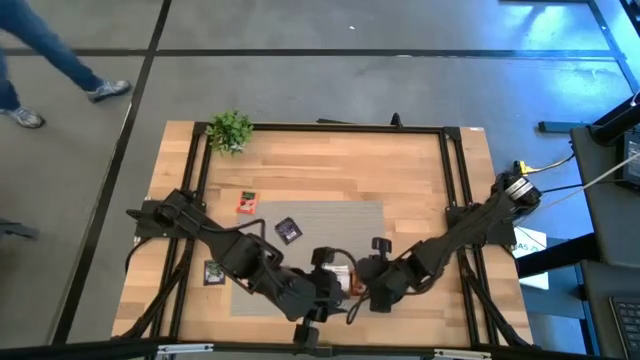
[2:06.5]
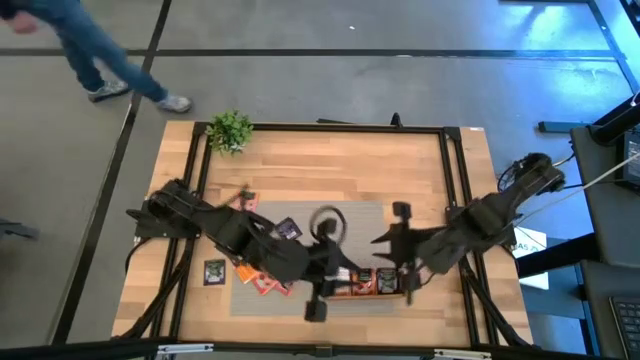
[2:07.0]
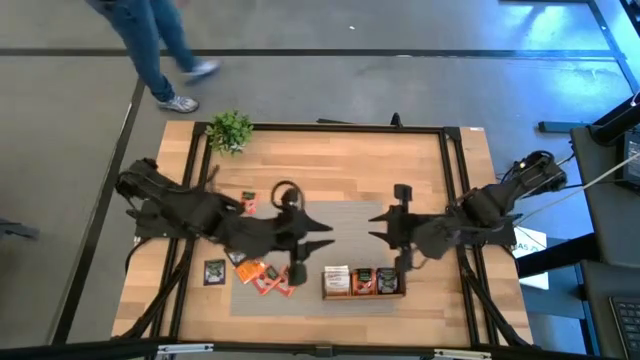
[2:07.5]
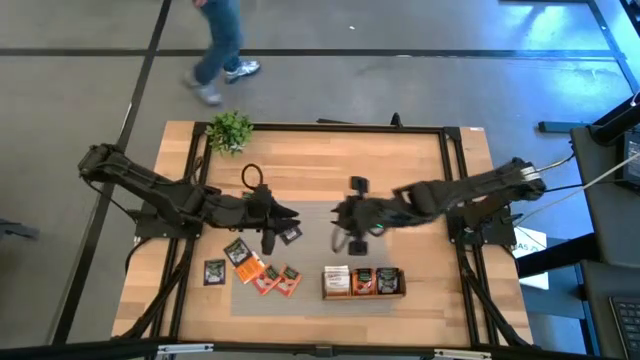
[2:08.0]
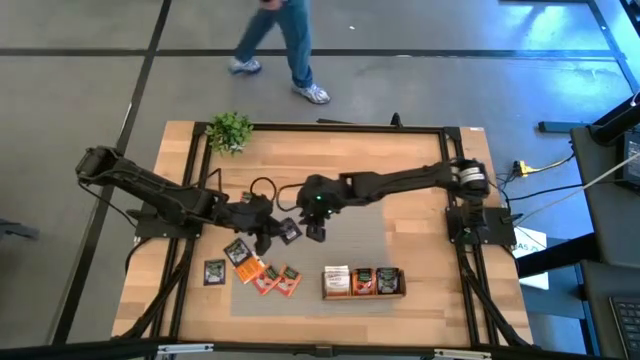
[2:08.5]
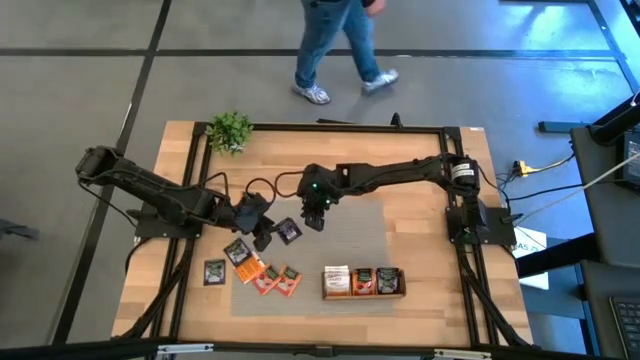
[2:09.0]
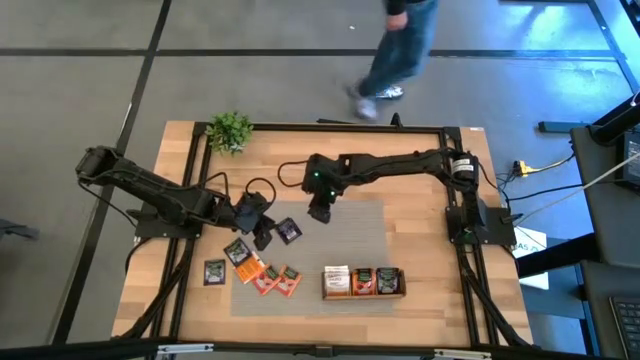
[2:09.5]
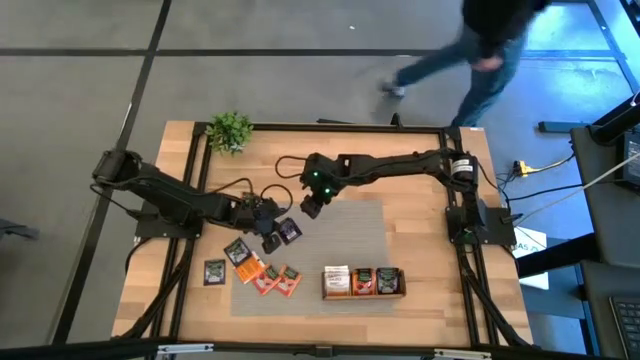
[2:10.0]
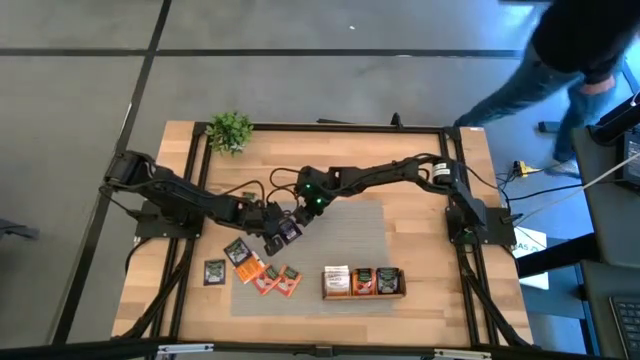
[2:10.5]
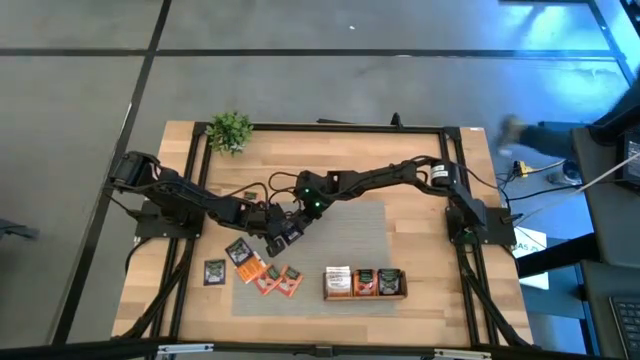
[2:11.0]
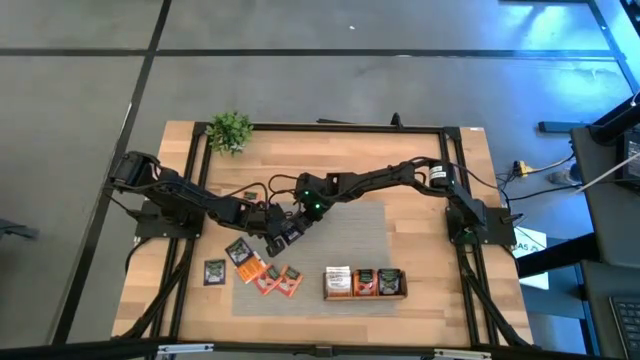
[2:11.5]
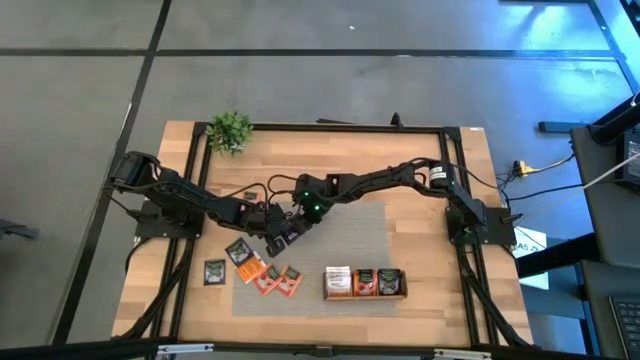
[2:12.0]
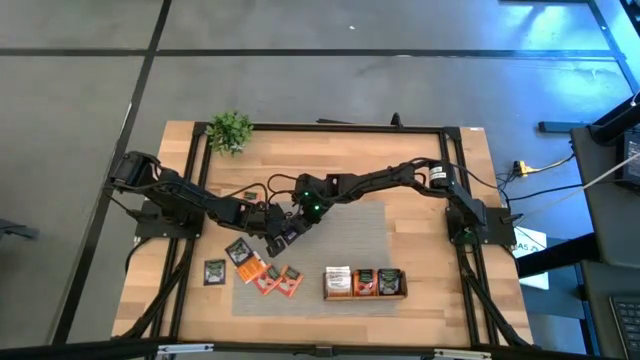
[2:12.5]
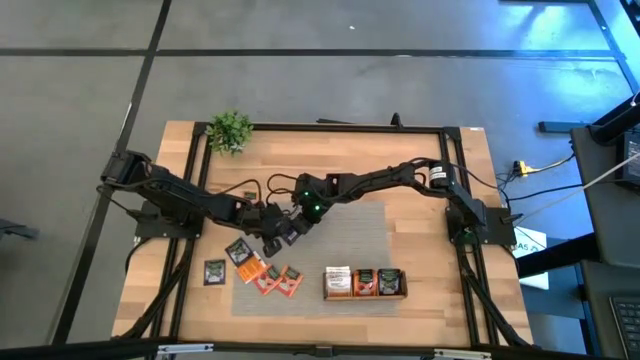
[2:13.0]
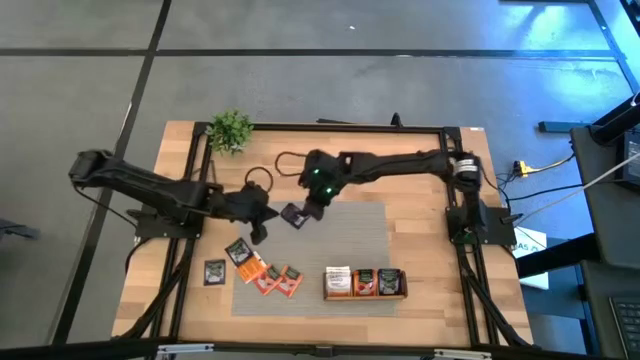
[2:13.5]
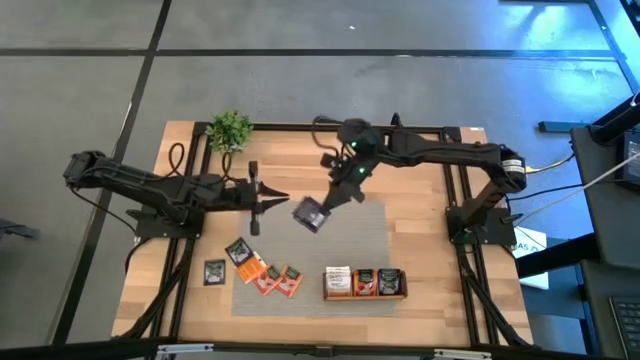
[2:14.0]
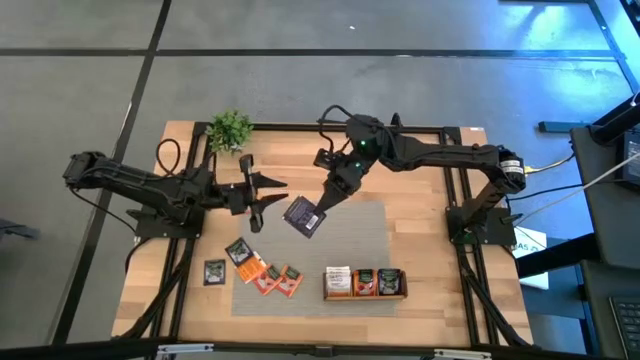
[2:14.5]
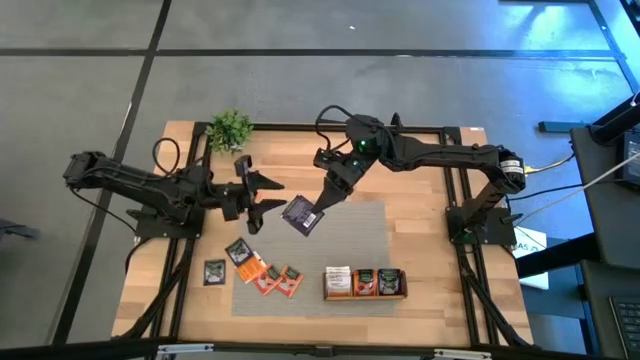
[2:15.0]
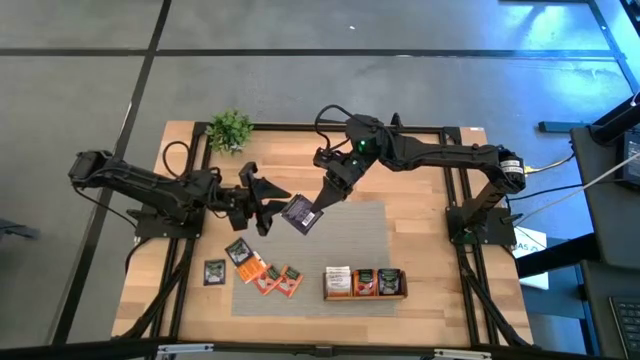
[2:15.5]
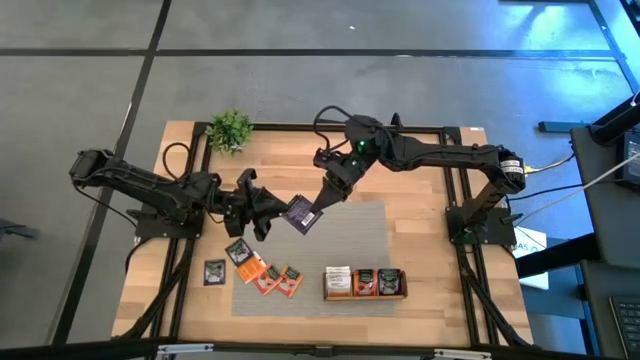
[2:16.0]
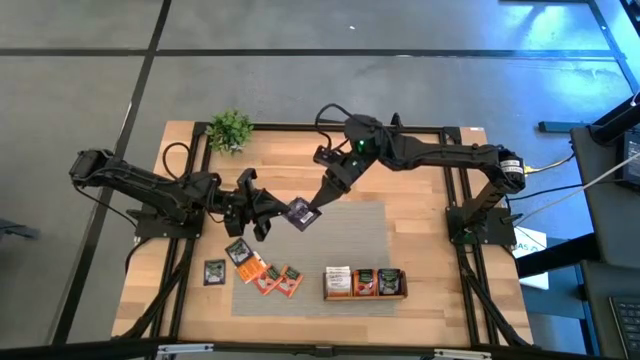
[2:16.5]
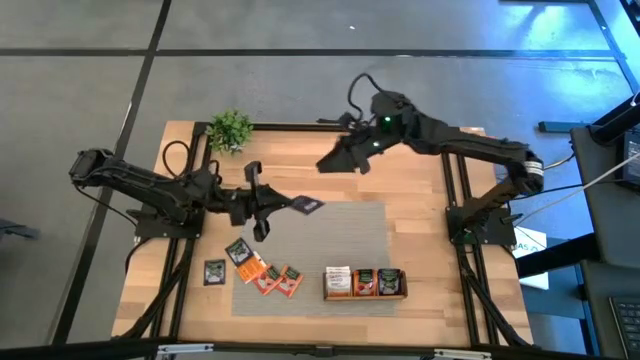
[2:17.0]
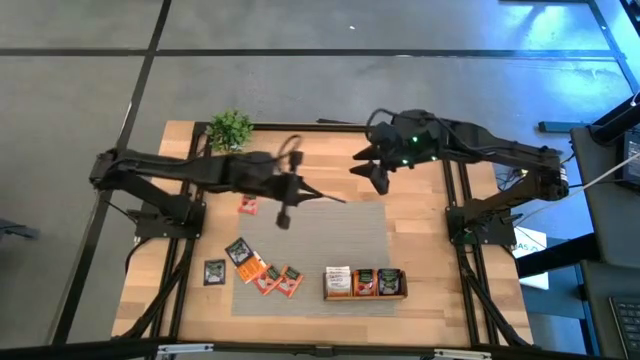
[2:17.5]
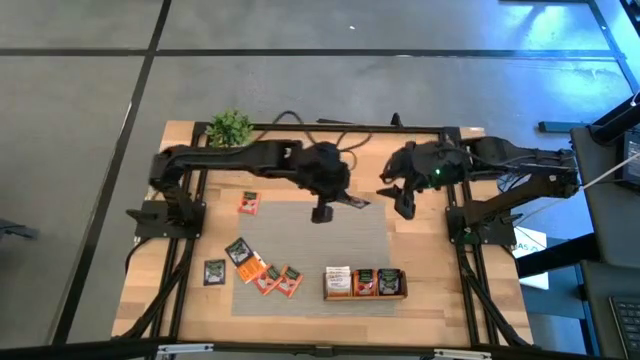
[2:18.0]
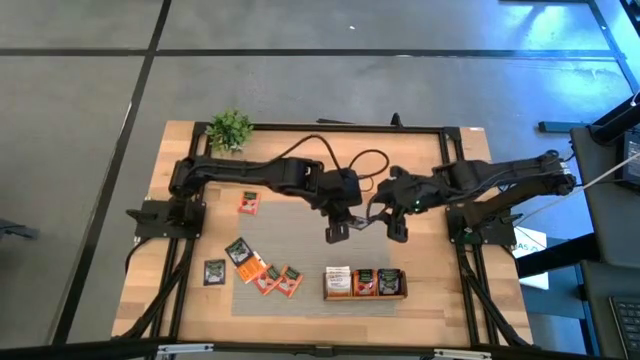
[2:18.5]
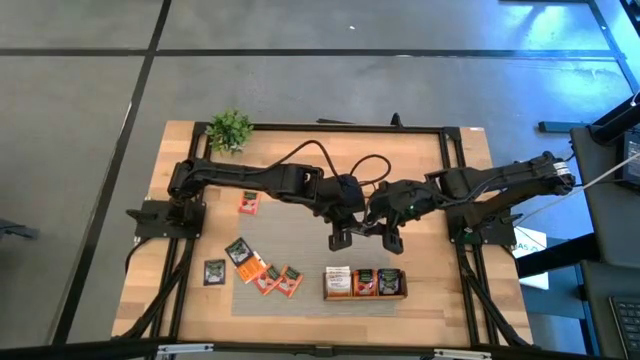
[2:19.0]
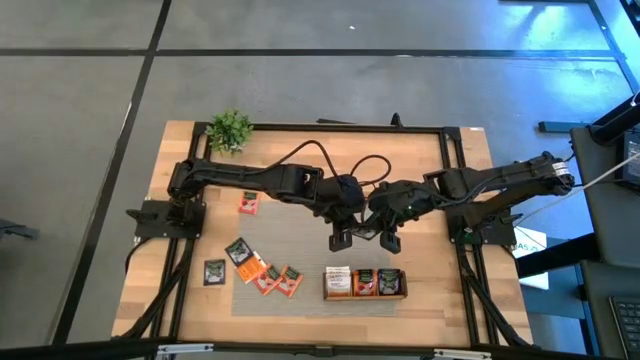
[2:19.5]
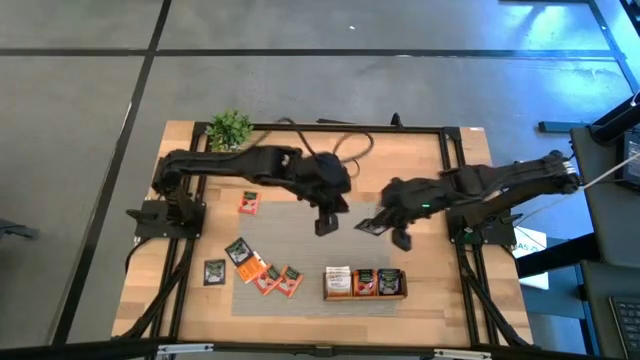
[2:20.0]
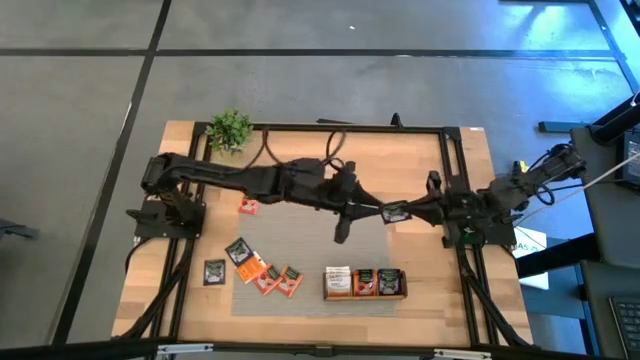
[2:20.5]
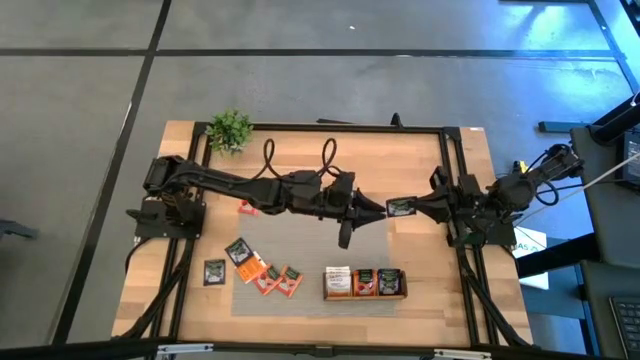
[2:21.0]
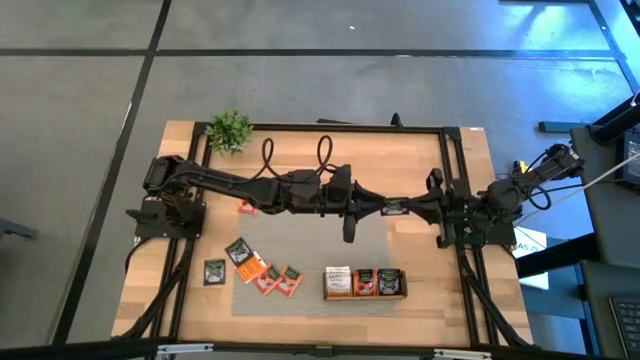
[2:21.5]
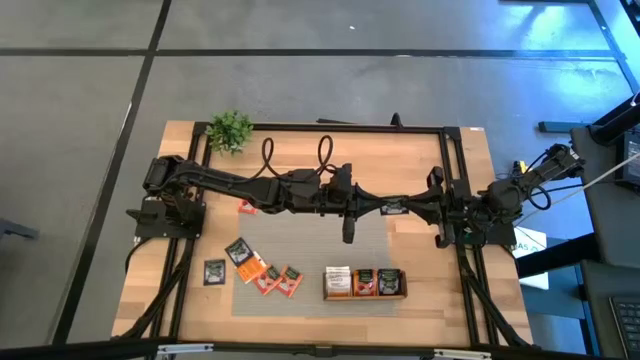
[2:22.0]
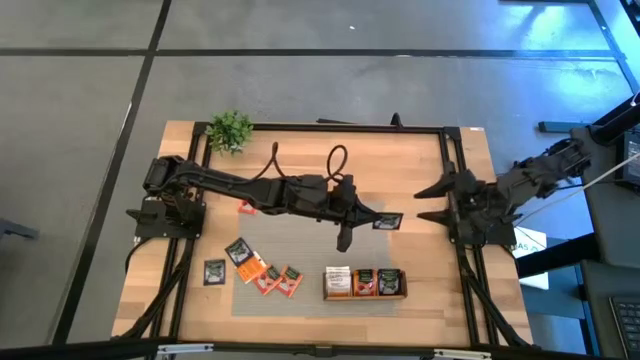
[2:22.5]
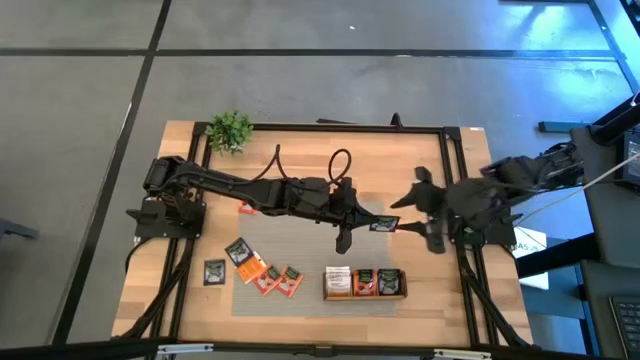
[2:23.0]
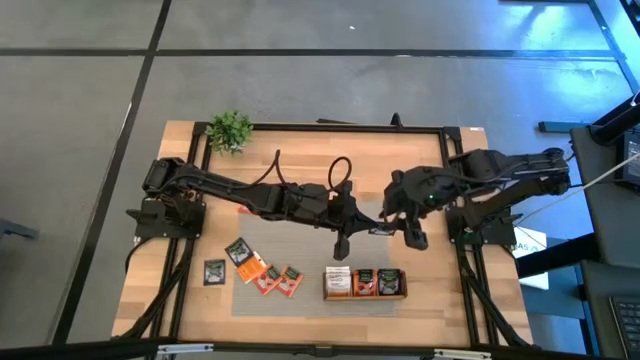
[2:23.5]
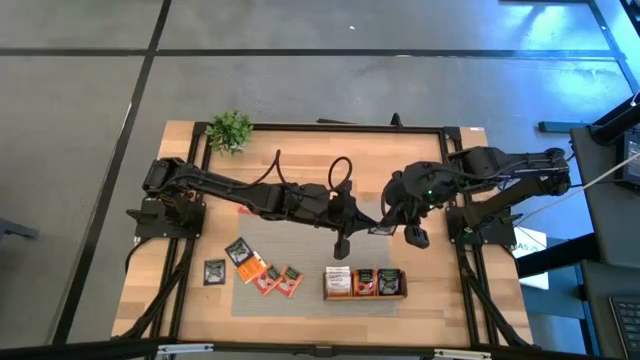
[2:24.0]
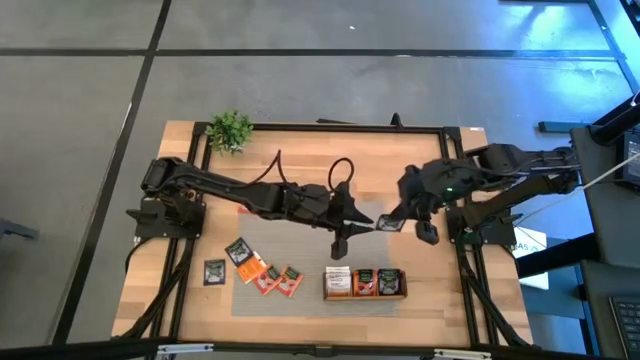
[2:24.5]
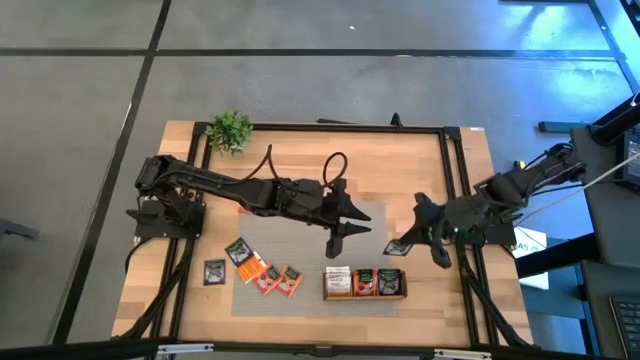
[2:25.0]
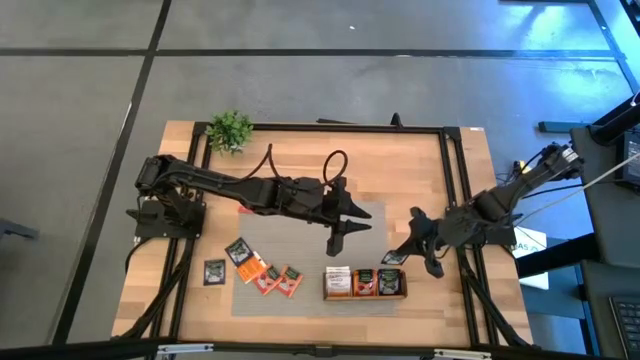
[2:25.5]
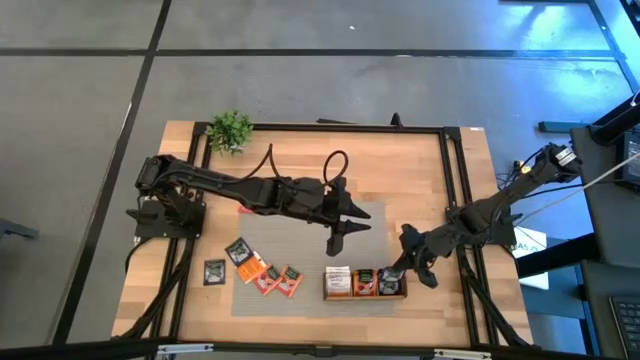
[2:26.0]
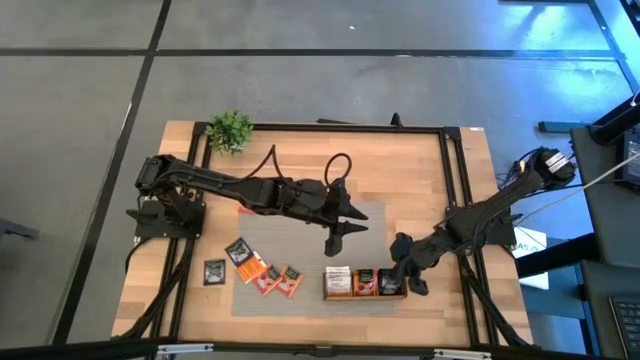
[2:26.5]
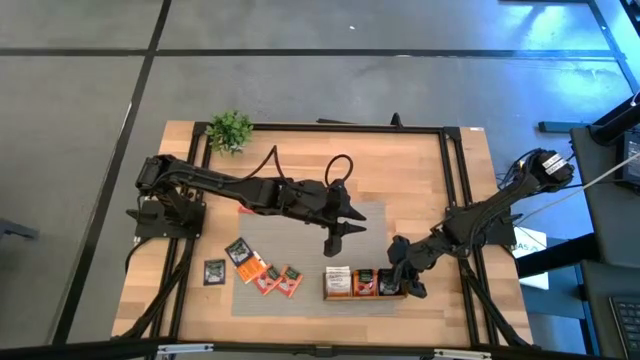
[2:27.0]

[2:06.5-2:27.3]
Task: Pick & Place Tea
Put the right black tea bag into the right compartment of the wooden organizer
